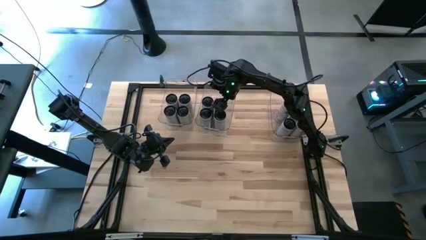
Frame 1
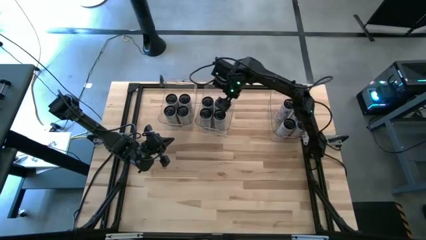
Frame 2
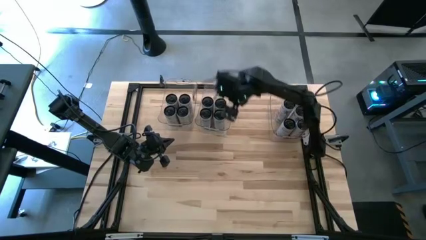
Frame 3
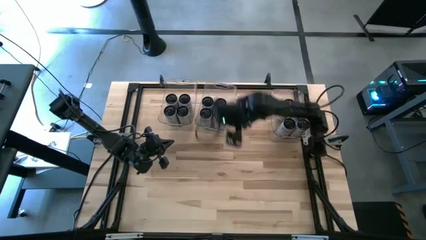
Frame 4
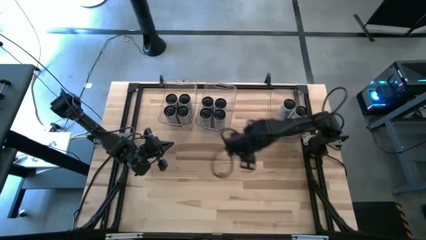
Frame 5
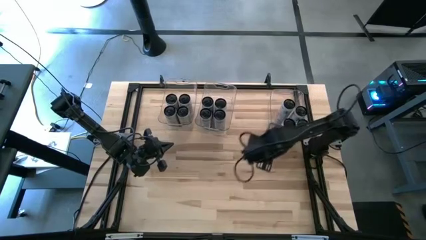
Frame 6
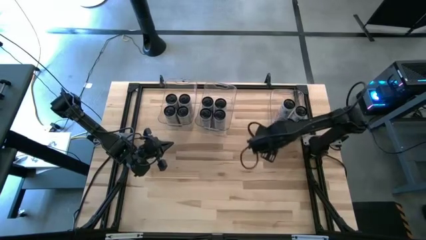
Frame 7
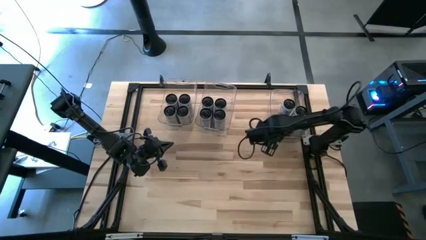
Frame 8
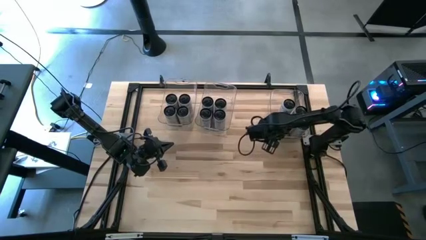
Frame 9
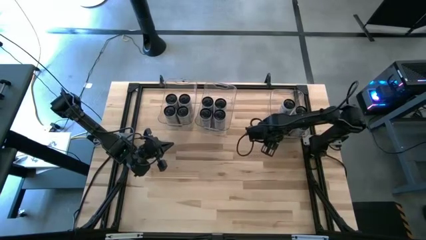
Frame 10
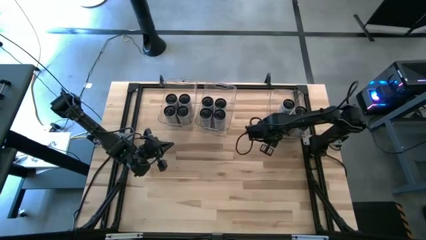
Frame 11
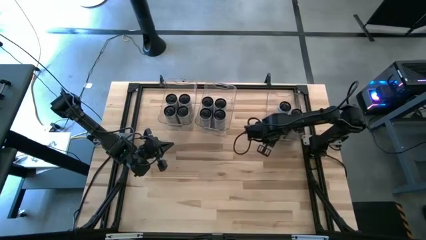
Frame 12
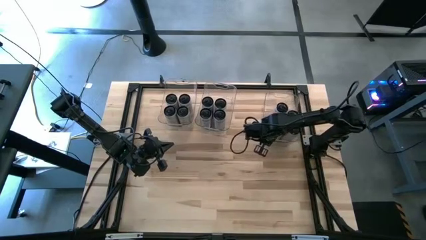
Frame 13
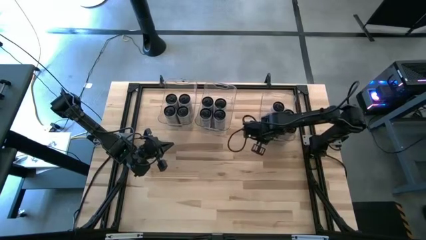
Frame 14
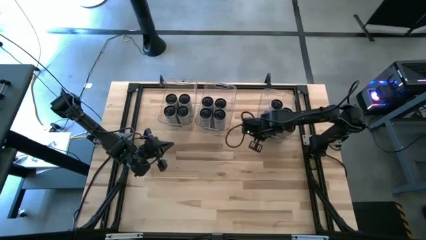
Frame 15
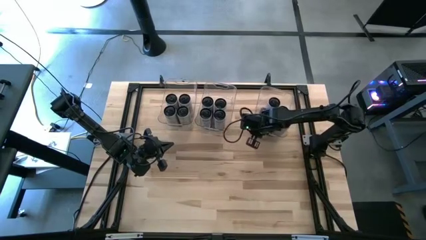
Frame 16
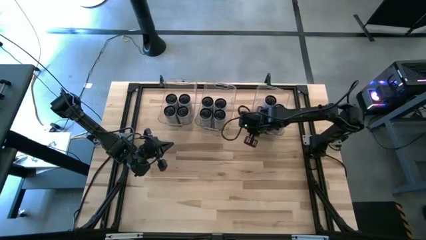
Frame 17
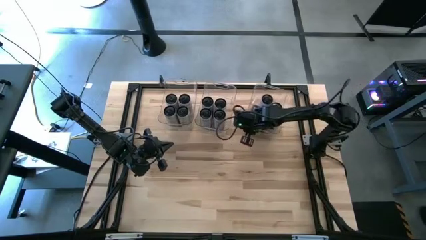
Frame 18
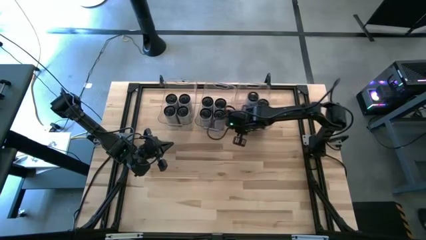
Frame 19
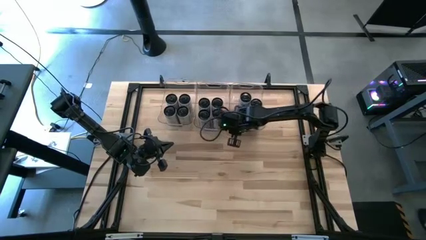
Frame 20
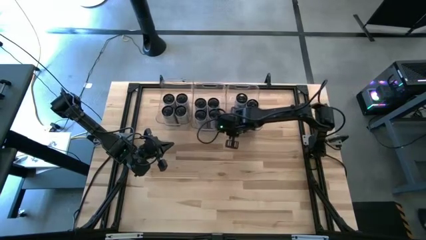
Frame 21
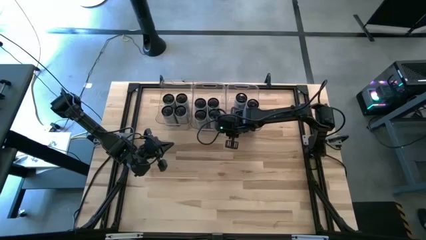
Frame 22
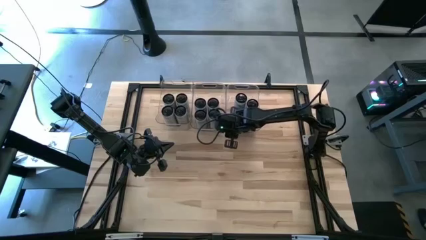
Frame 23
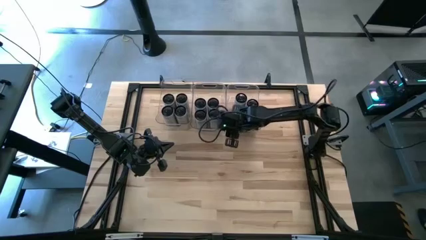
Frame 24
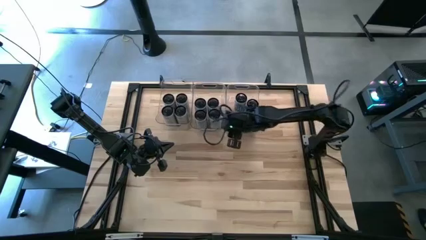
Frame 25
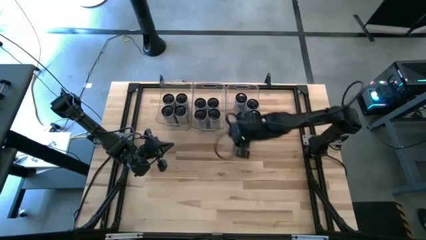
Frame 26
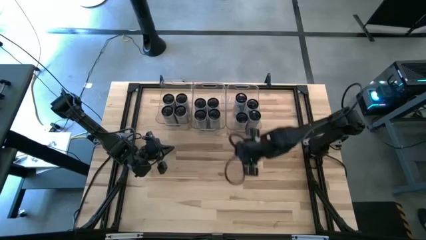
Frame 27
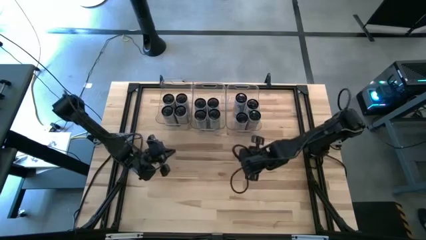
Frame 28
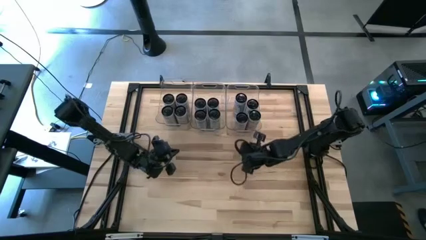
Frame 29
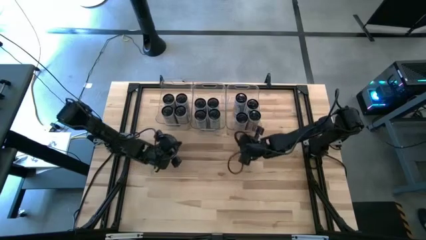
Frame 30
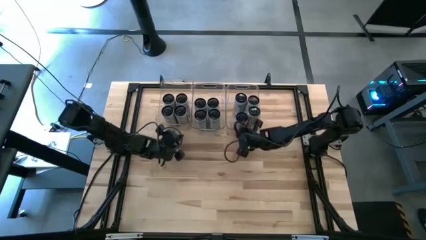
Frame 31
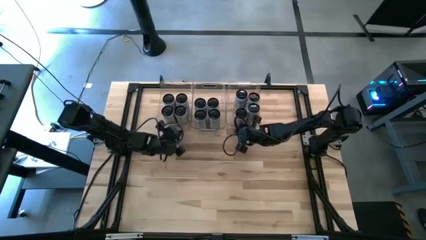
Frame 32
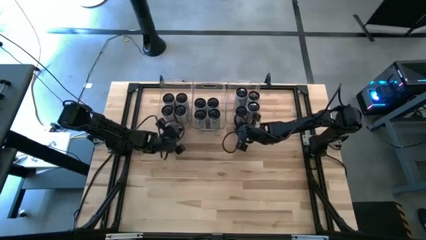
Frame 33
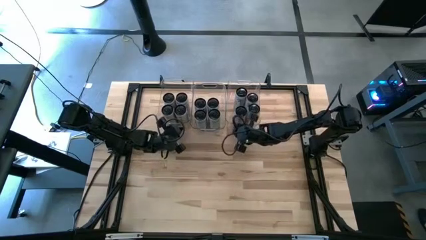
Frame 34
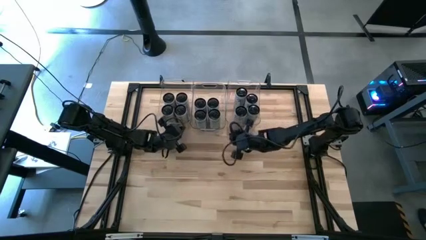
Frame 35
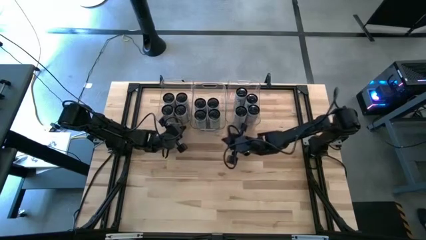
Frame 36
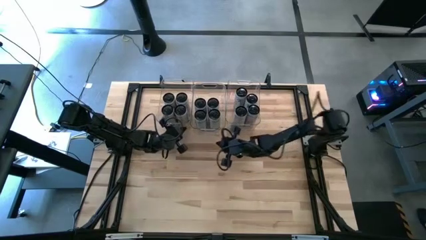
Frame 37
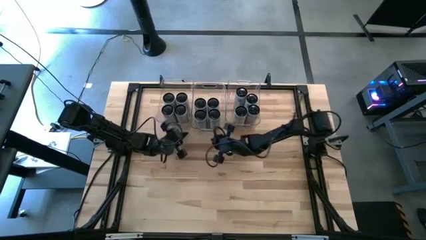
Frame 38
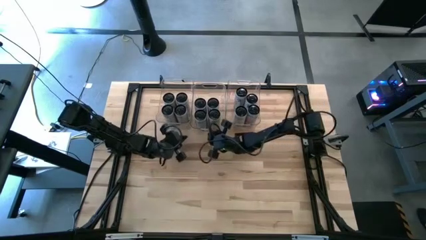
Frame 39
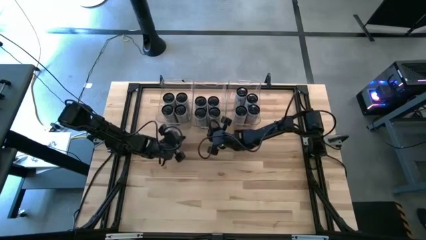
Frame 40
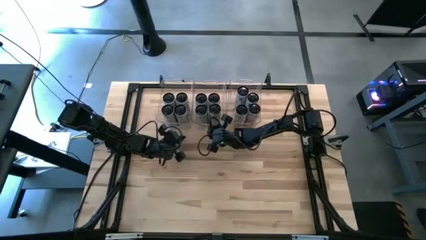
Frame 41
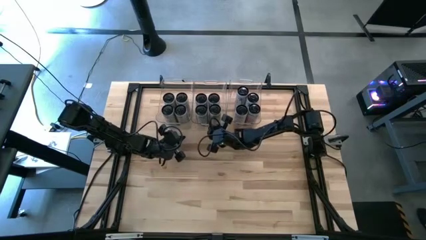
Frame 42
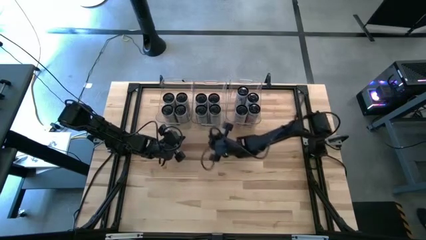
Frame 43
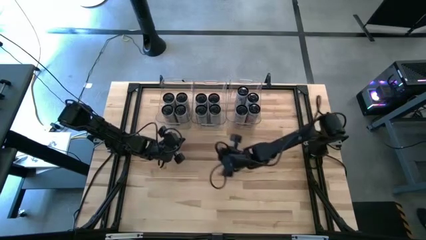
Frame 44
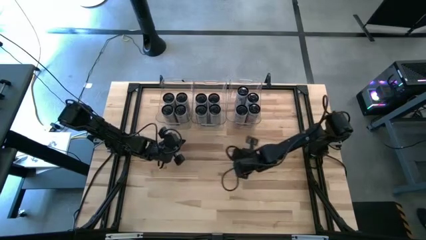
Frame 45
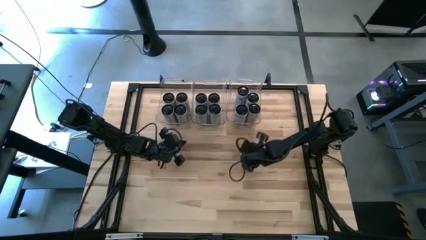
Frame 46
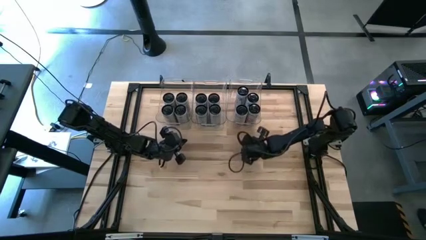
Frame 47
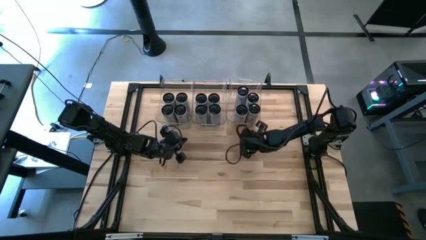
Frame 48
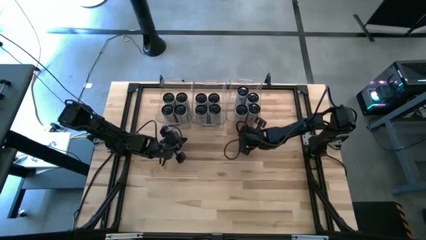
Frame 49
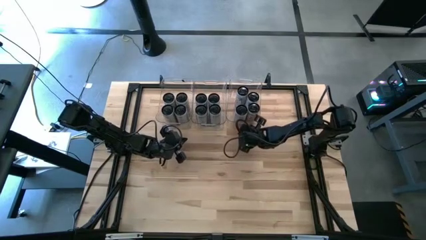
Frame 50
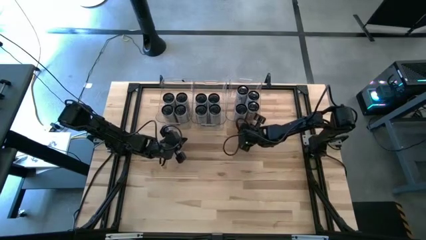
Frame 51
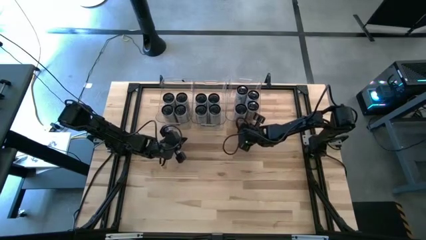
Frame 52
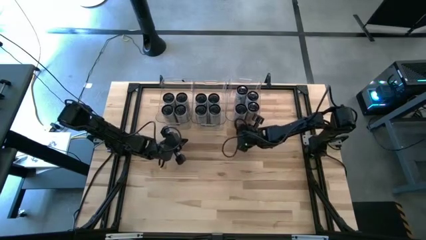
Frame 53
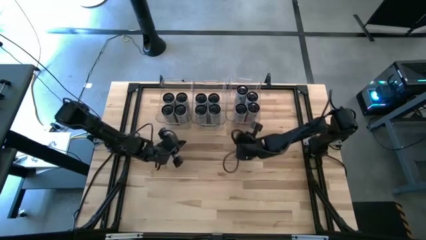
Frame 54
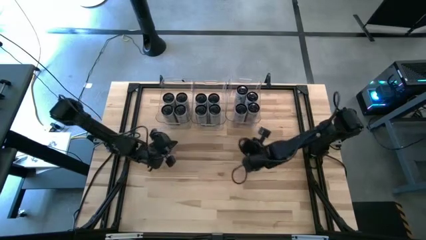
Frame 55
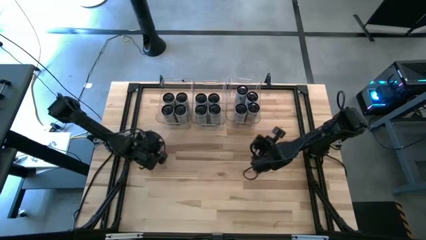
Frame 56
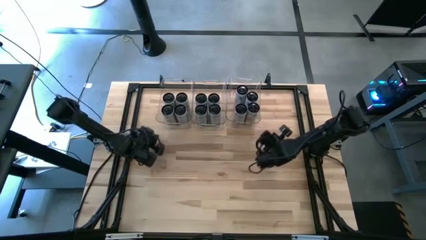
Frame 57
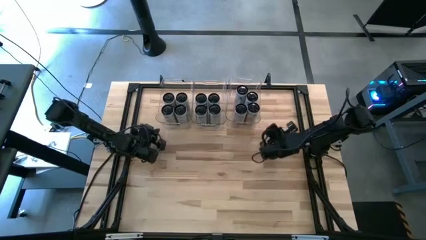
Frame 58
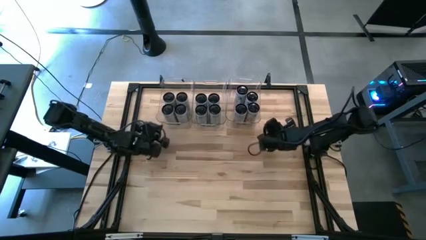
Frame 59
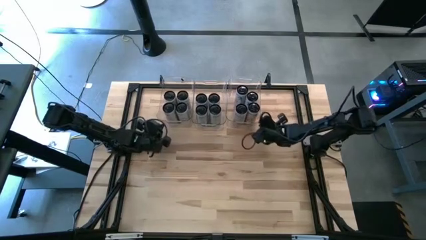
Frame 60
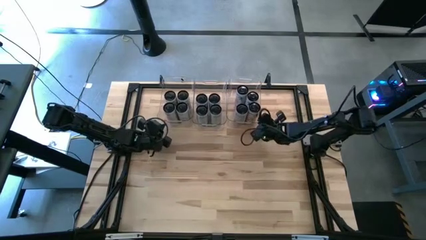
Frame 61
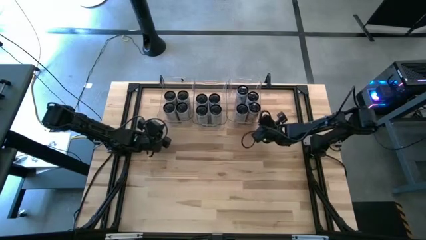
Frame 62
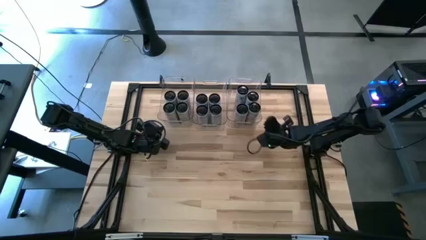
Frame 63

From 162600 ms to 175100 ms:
Task: Sort soda cans
Adjust the transparent bins
